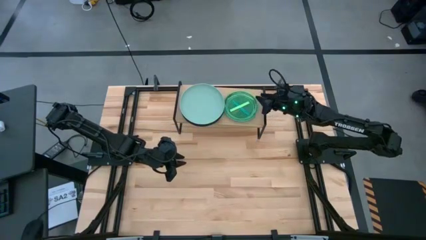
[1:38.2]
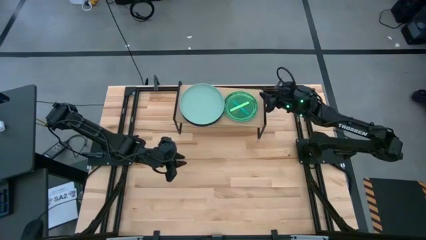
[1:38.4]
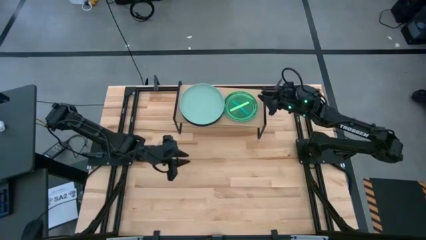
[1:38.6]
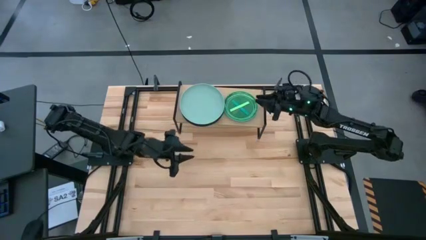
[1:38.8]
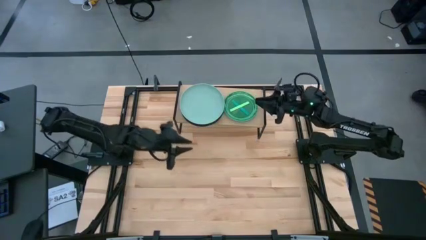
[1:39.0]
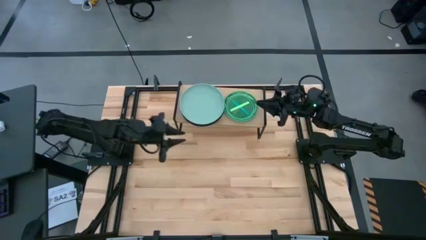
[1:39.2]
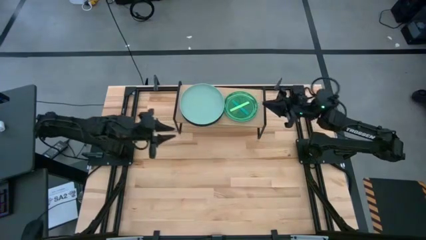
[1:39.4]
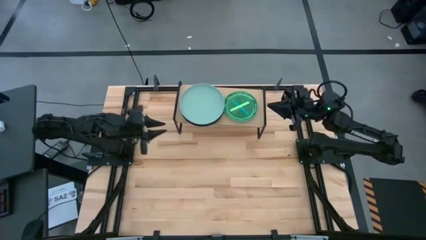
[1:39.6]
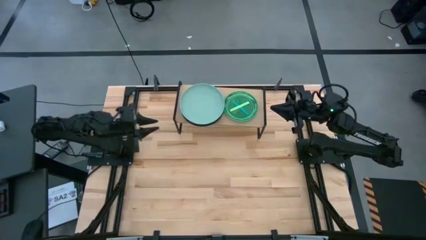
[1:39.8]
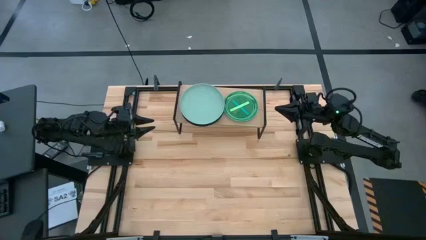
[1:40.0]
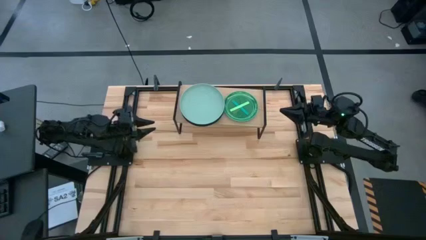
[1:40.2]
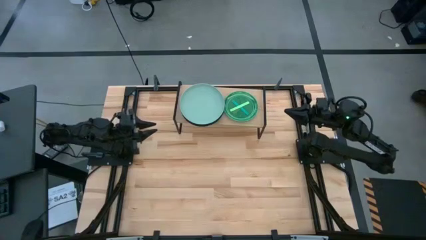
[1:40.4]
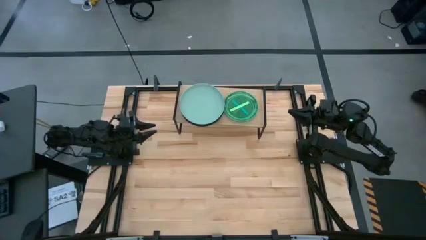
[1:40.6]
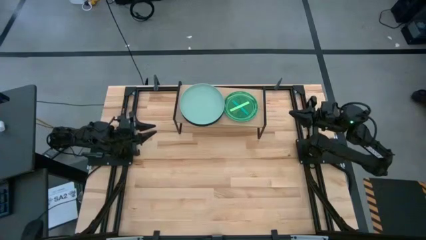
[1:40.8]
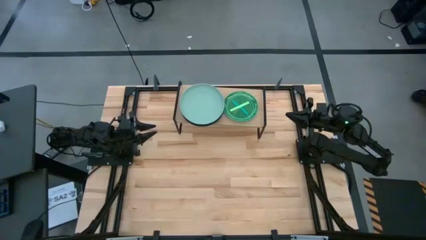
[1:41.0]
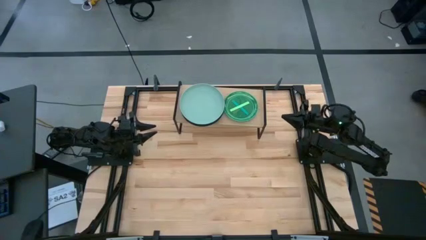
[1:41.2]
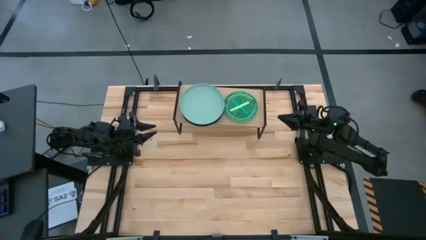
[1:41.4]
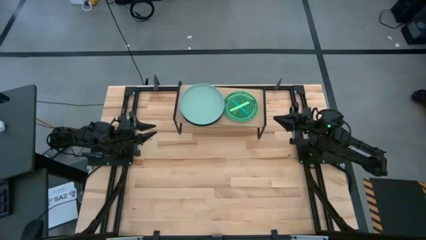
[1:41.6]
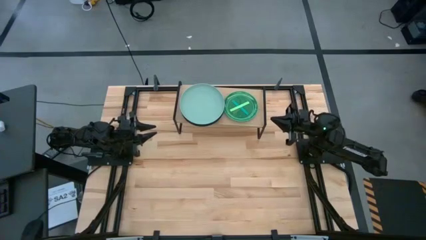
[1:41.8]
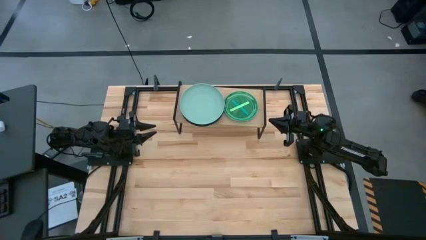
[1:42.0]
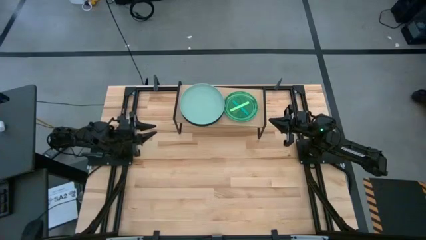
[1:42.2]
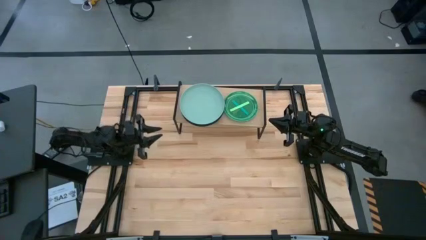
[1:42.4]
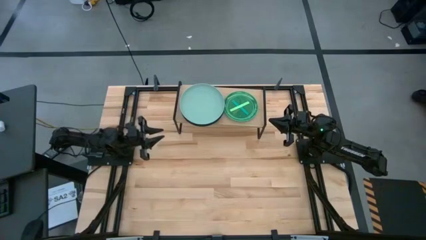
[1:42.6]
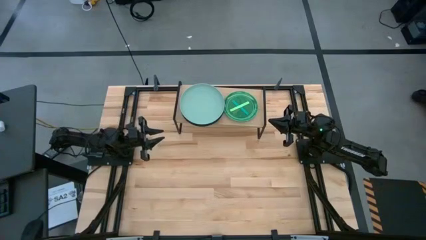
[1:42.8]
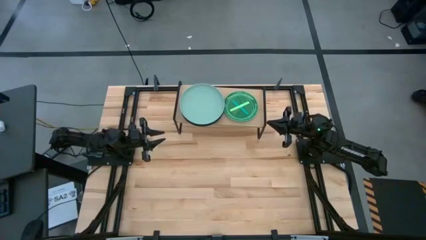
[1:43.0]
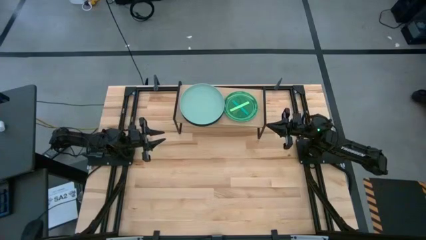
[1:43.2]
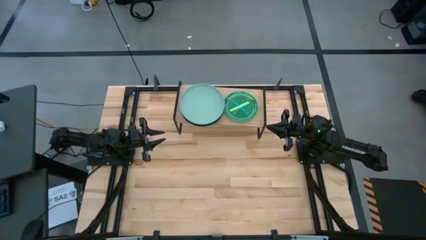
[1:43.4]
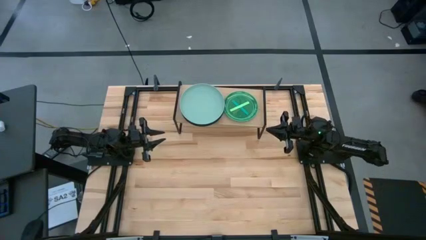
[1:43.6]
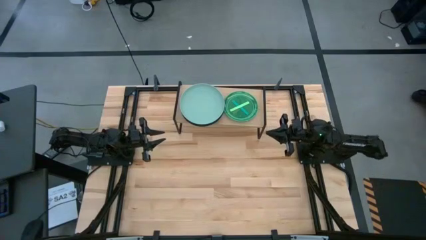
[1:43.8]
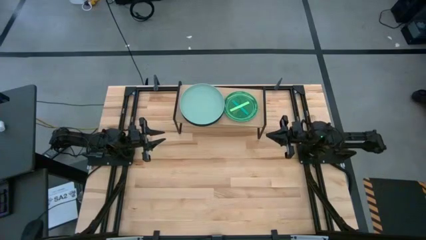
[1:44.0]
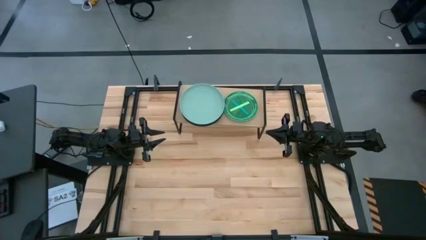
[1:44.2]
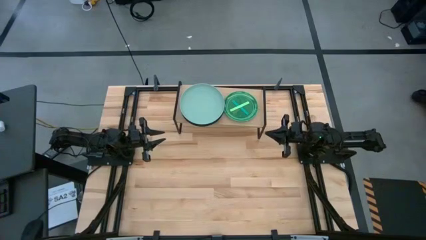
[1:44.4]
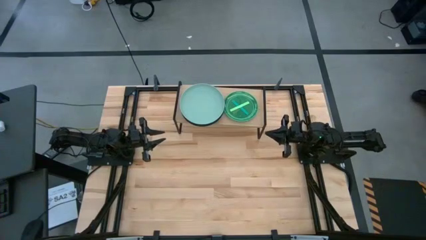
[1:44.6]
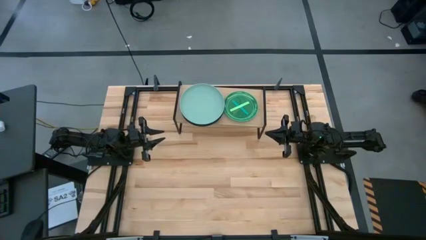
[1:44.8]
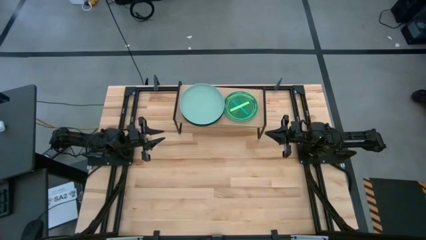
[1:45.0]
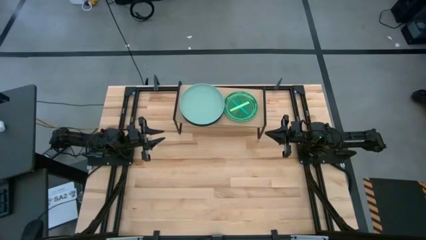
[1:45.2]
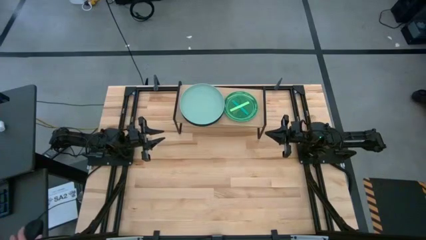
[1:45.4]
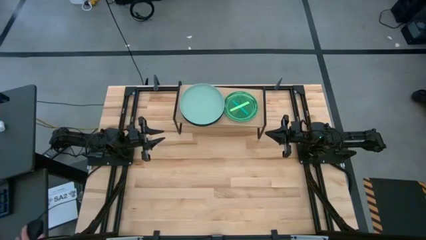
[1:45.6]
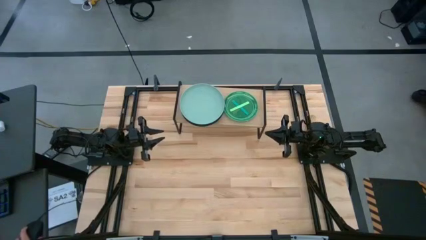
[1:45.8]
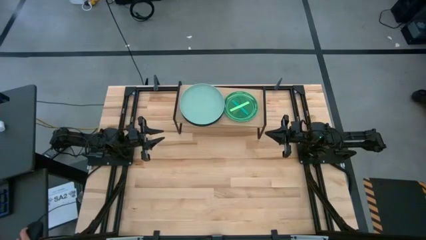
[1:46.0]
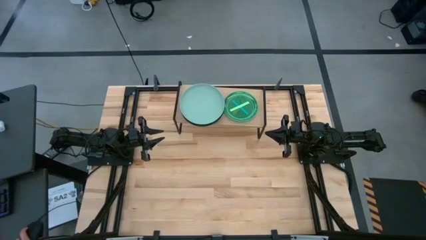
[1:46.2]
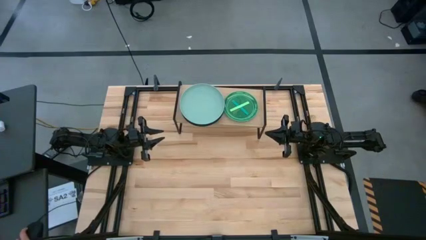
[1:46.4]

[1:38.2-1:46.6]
Task: Place and stack plates onto a shelf
Return to Home Position

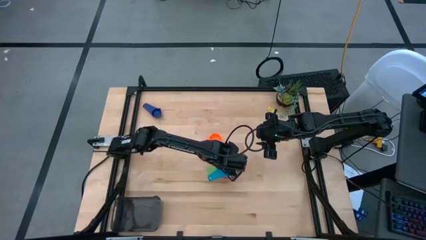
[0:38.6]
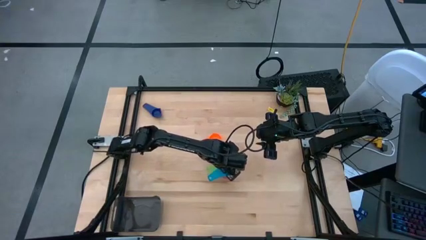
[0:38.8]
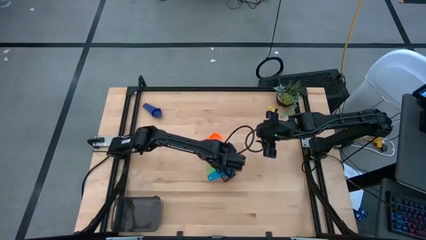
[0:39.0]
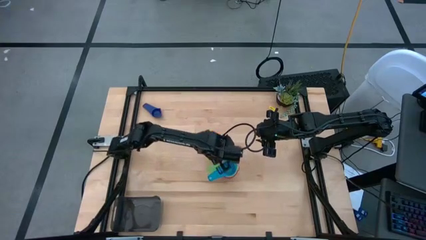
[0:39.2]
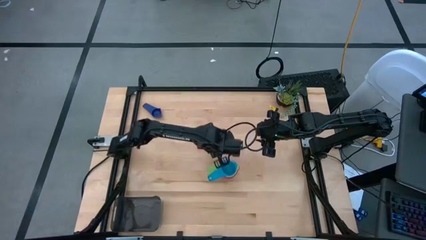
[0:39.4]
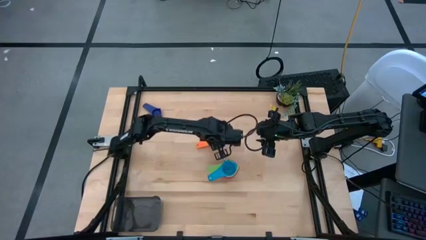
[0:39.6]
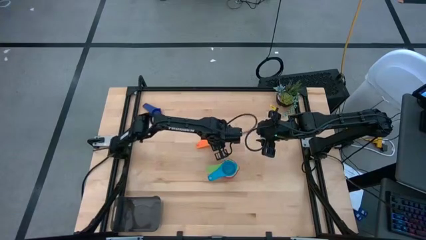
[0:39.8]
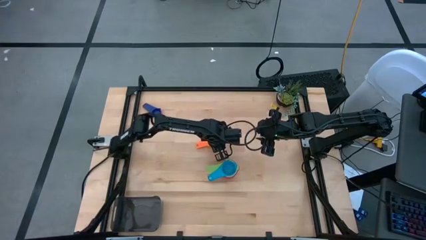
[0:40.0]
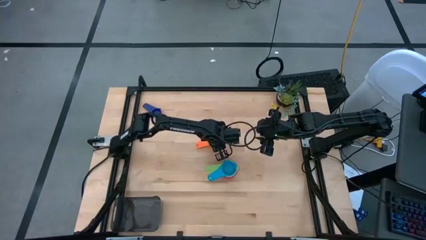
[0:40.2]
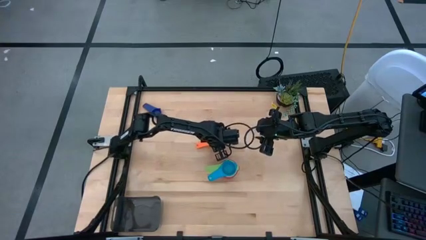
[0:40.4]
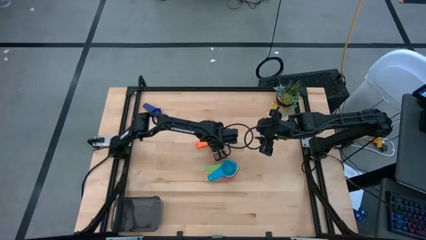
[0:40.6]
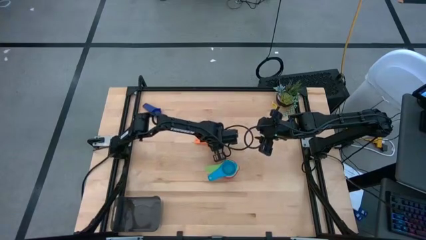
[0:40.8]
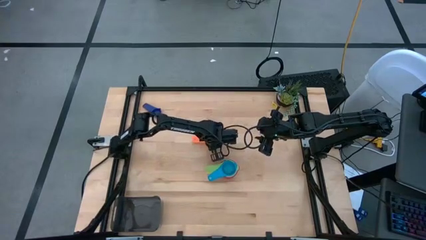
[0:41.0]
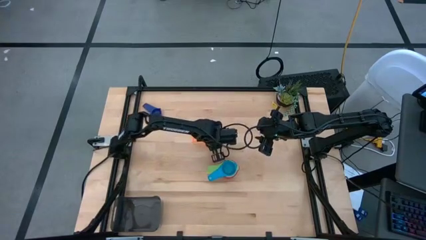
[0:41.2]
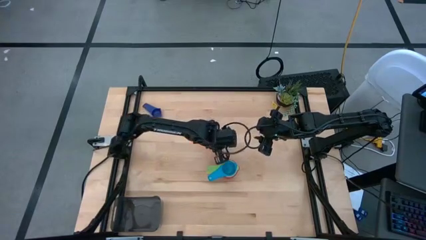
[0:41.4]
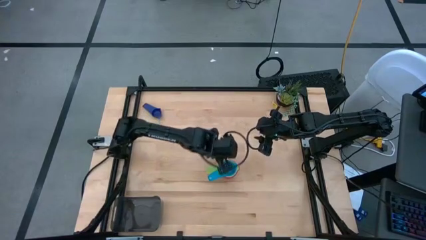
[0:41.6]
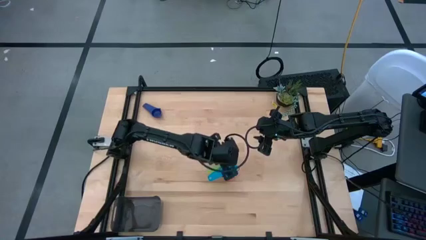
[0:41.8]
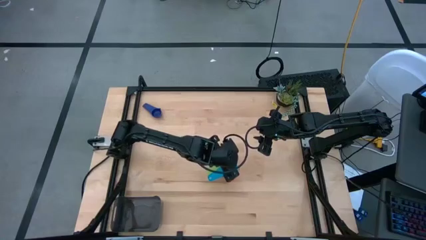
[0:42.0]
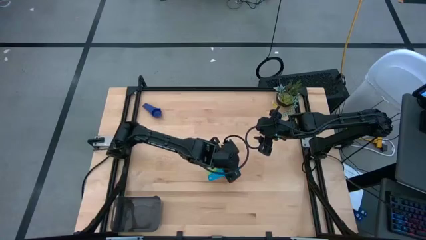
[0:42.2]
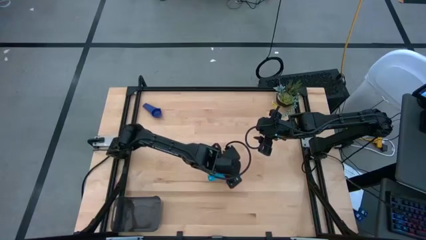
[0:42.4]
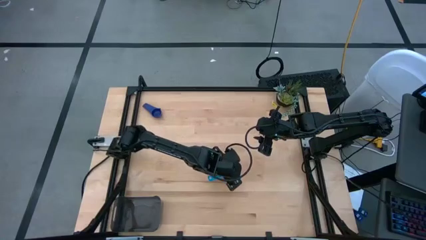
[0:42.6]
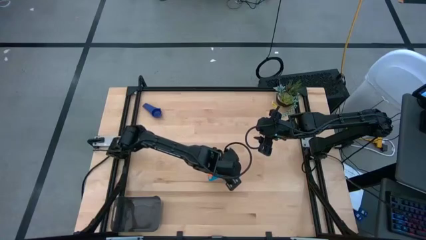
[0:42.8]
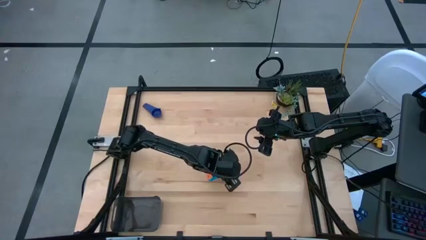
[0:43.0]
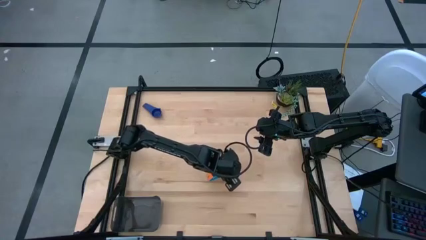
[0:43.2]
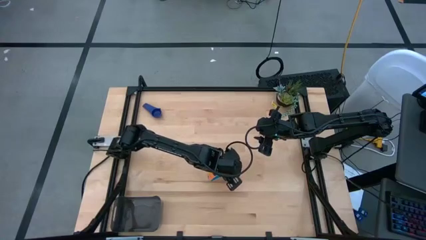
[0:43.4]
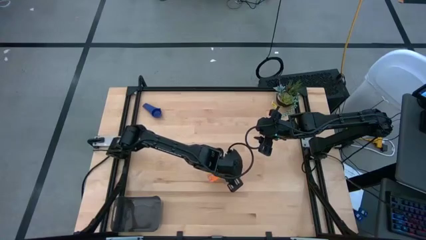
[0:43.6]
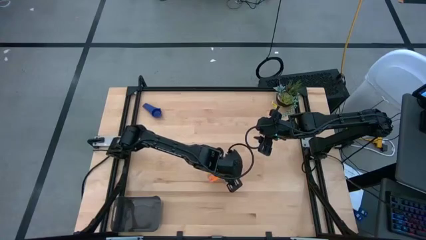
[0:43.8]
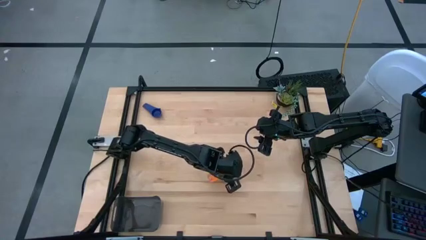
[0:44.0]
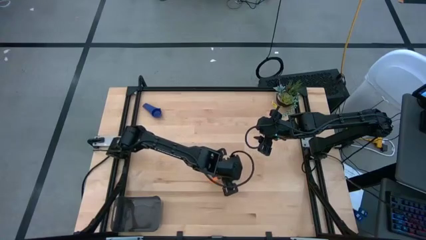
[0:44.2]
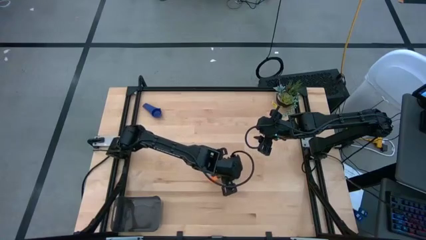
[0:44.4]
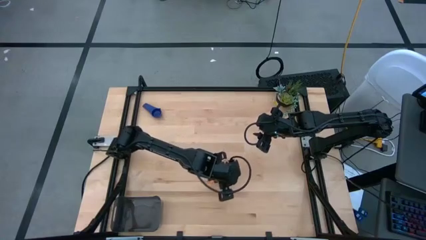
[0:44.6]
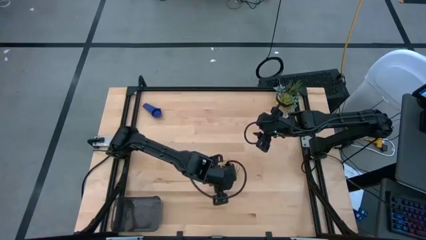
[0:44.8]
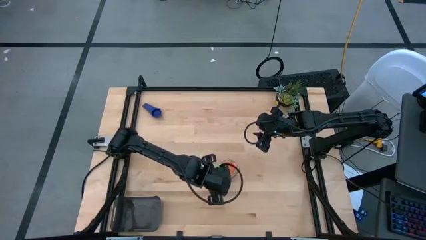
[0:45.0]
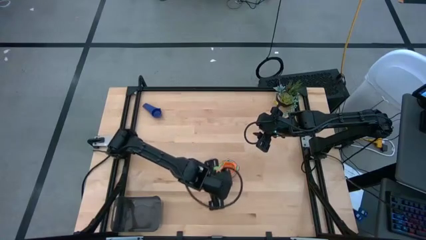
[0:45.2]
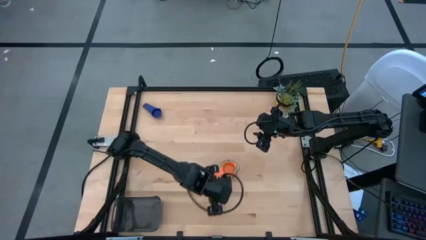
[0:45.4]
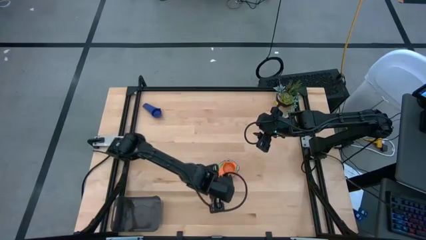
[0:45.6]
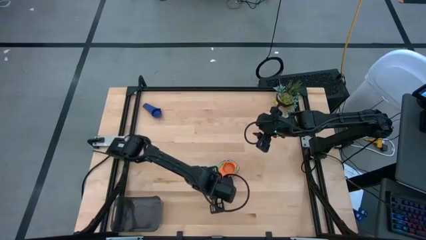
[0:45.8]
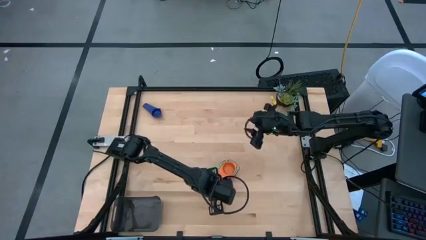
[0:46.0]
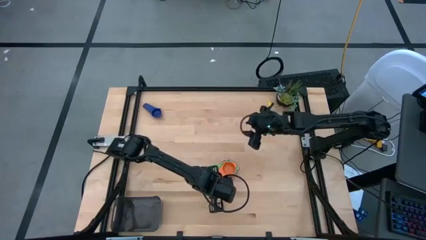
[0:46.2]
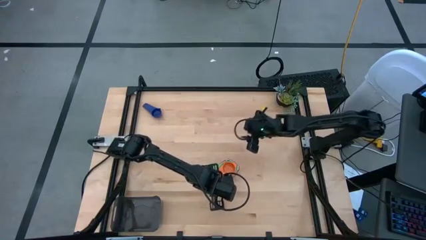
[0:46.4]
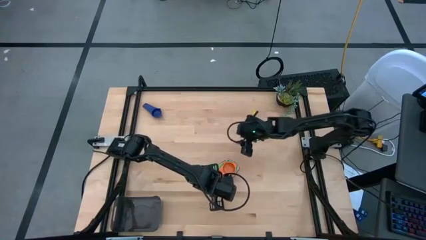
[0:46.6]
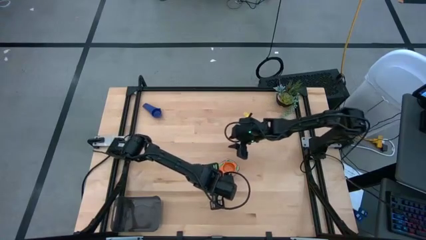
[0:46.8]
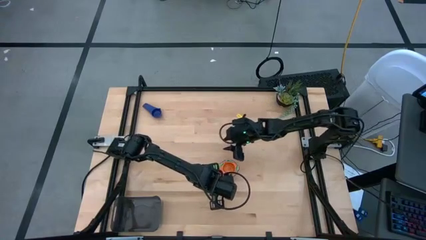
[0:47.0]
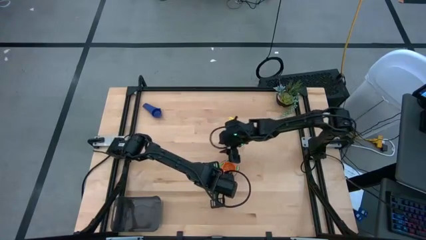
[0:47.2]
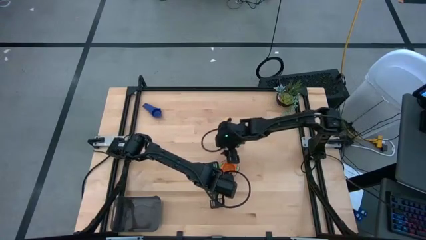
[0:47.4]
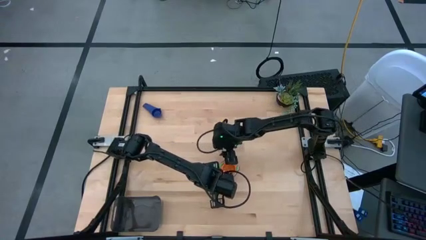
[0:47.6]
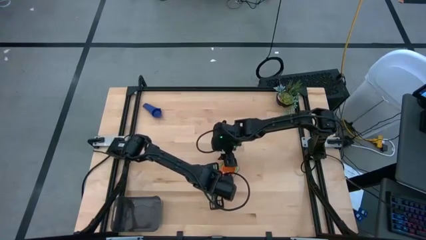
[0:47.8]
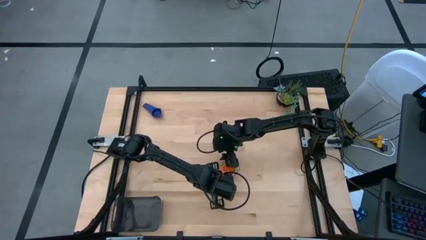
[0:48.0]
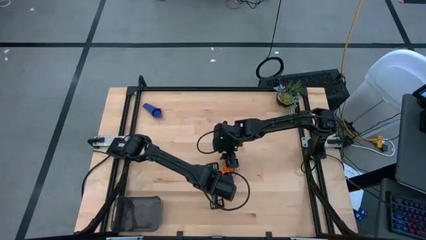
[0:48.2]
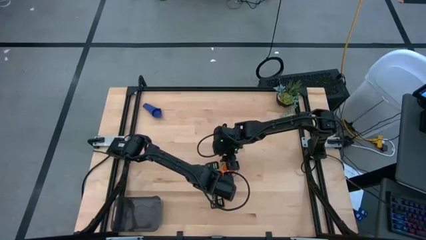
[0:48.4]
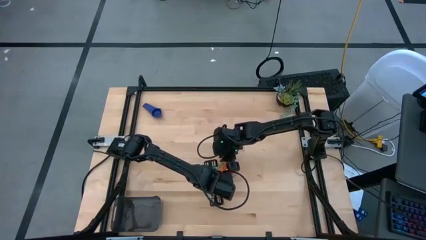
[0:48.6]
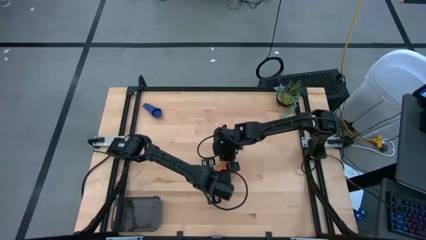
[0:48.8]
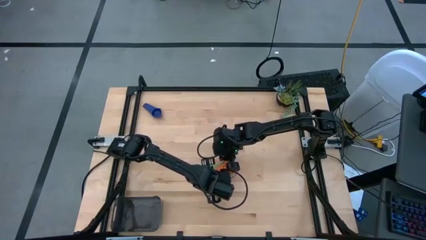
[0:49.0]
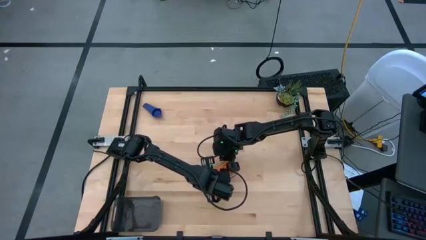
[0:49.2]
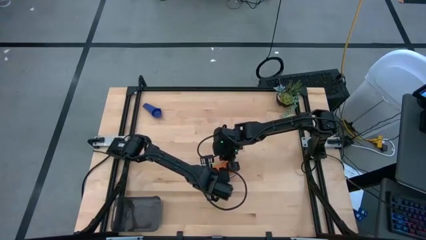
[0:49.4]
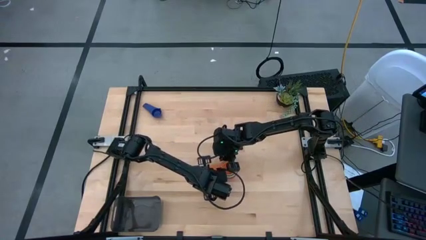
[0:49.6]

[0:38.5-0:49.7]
Task: Nest measuring cups in basket
Stack the orange measuring cup on top of the light blue measuring cup
